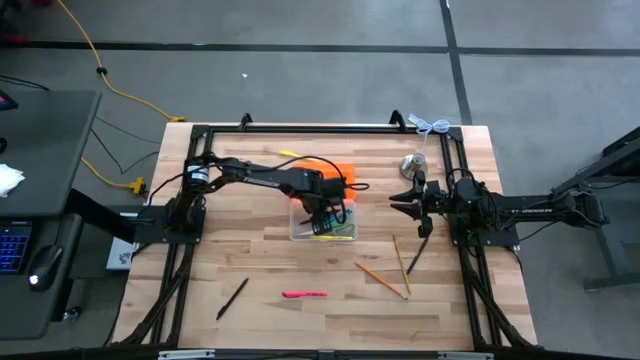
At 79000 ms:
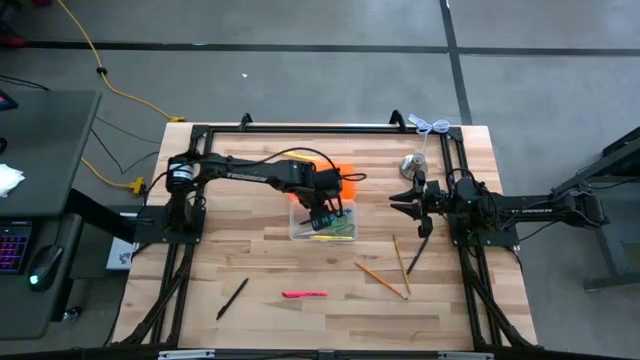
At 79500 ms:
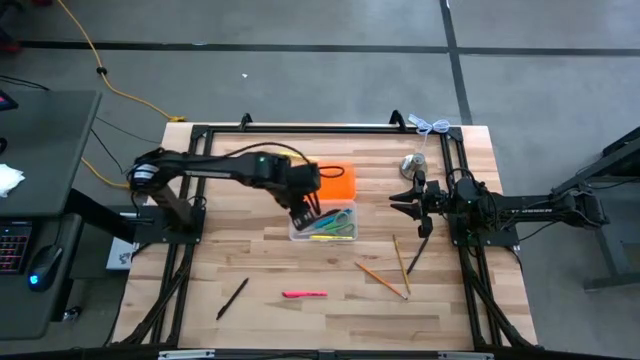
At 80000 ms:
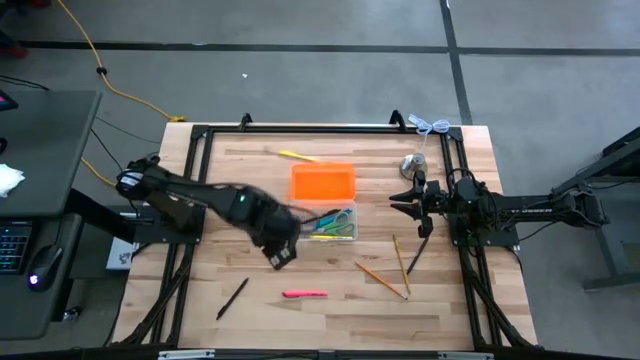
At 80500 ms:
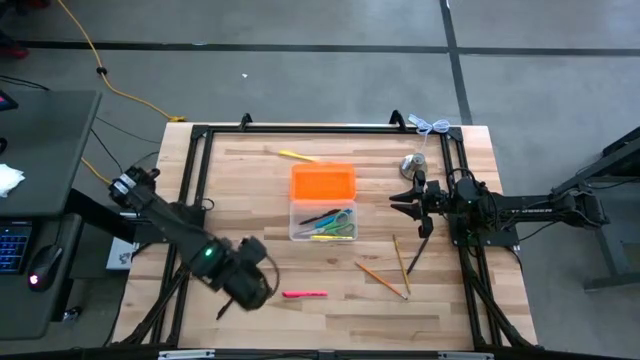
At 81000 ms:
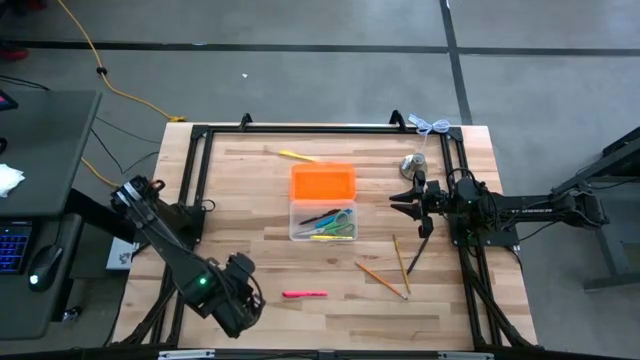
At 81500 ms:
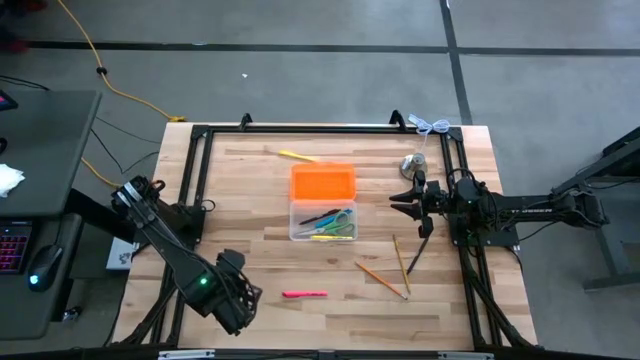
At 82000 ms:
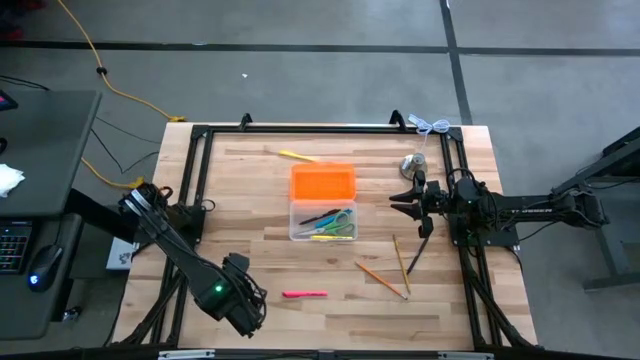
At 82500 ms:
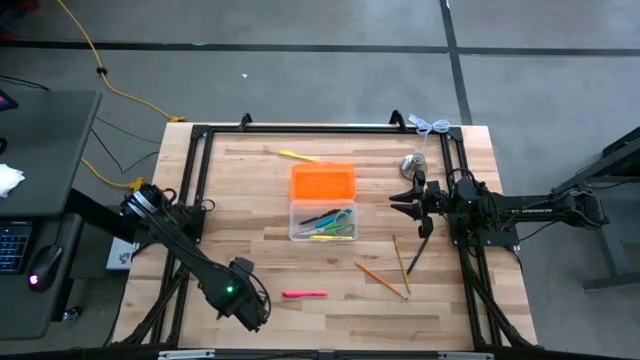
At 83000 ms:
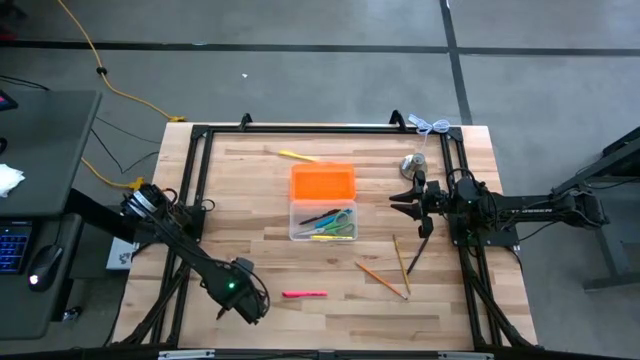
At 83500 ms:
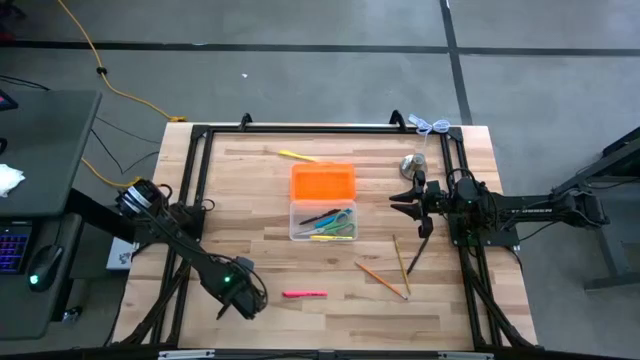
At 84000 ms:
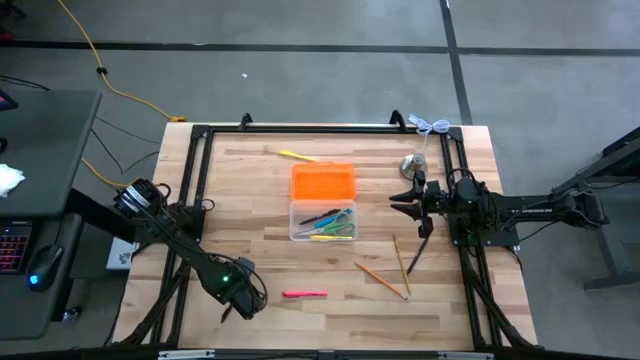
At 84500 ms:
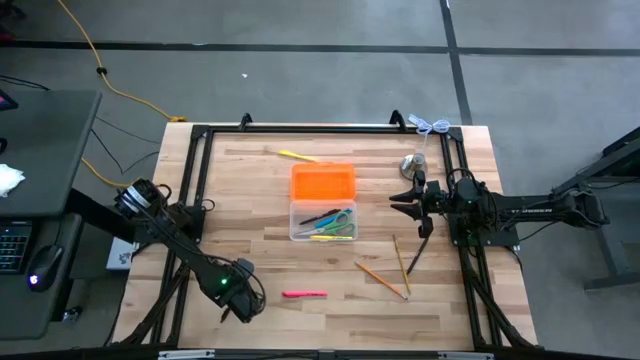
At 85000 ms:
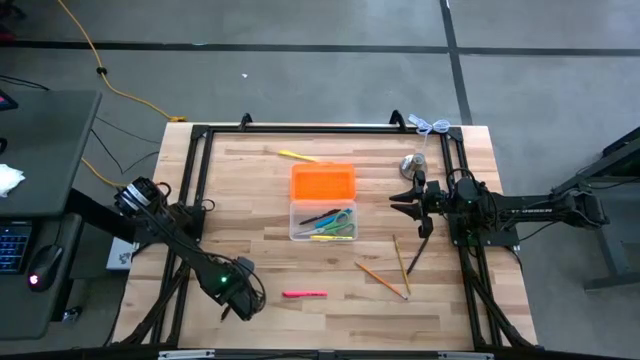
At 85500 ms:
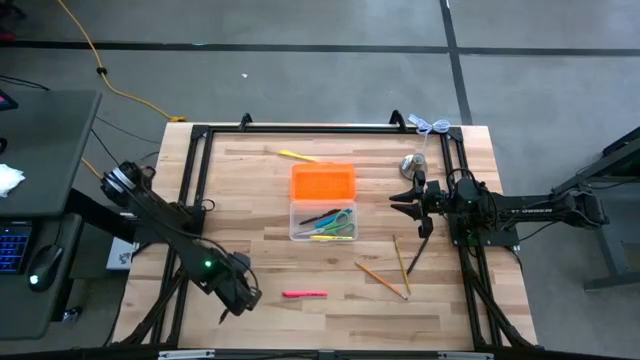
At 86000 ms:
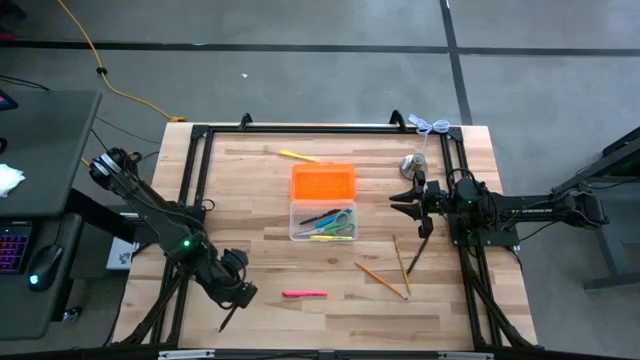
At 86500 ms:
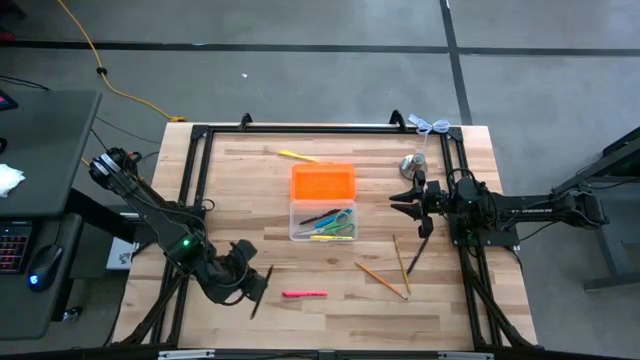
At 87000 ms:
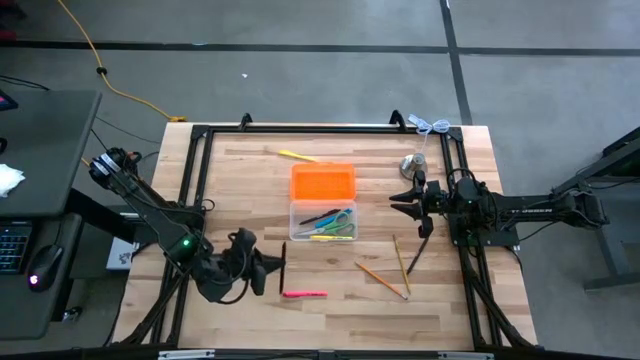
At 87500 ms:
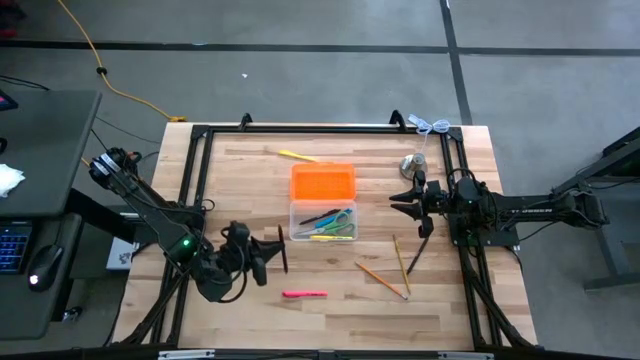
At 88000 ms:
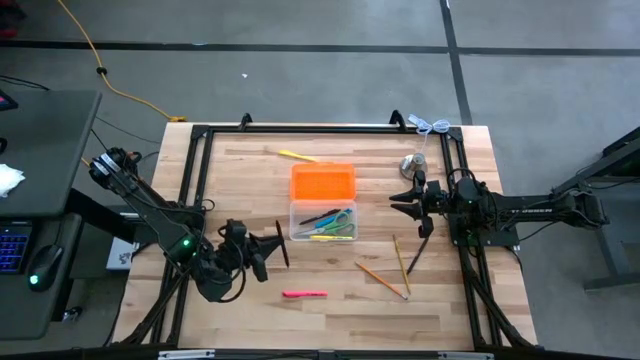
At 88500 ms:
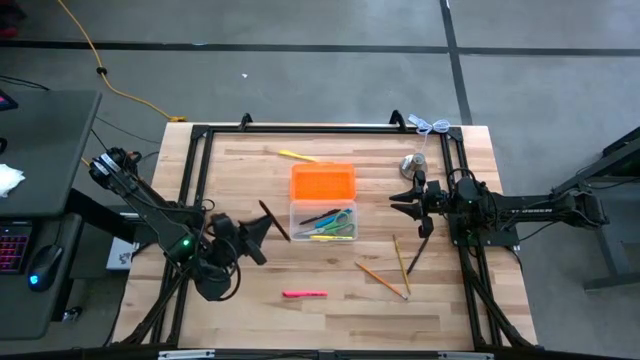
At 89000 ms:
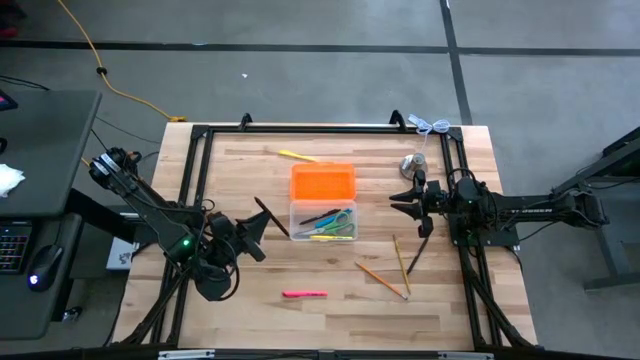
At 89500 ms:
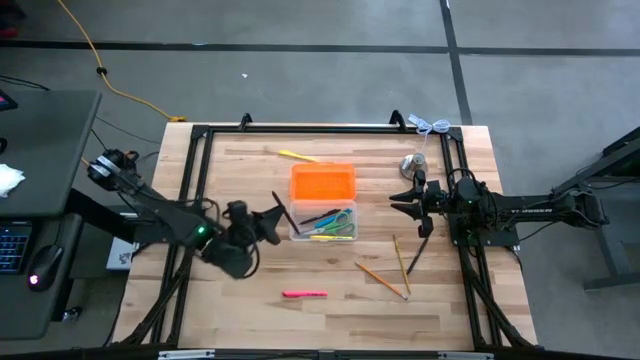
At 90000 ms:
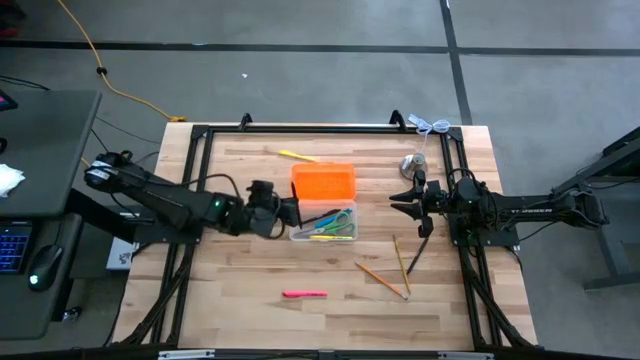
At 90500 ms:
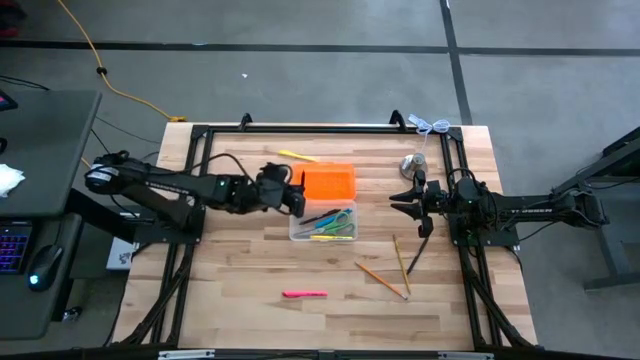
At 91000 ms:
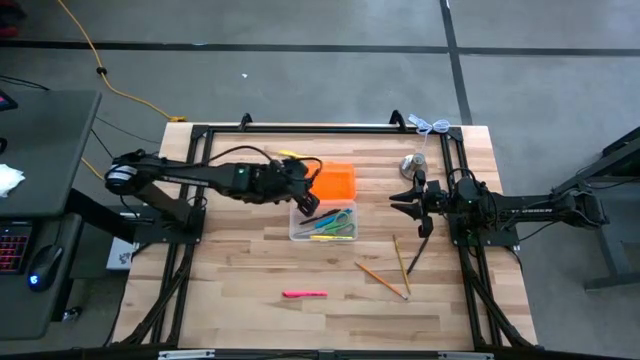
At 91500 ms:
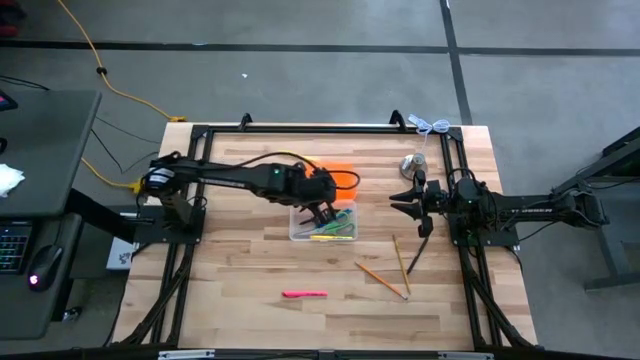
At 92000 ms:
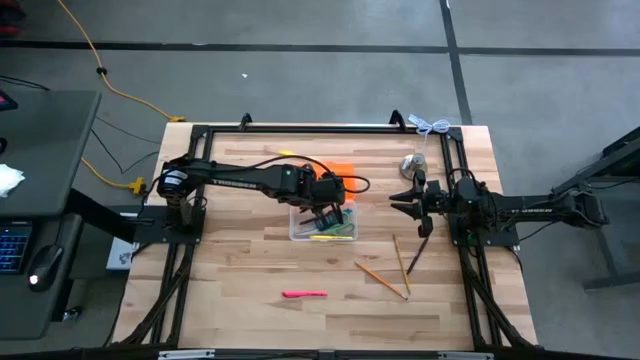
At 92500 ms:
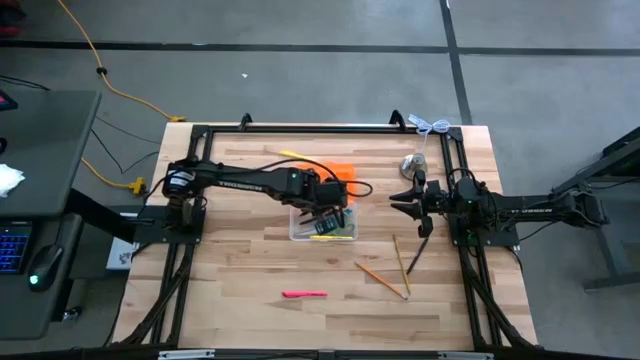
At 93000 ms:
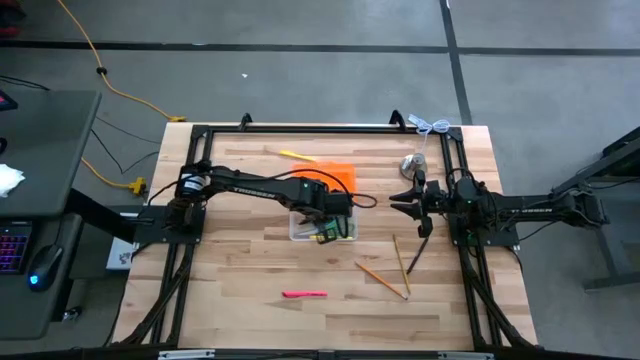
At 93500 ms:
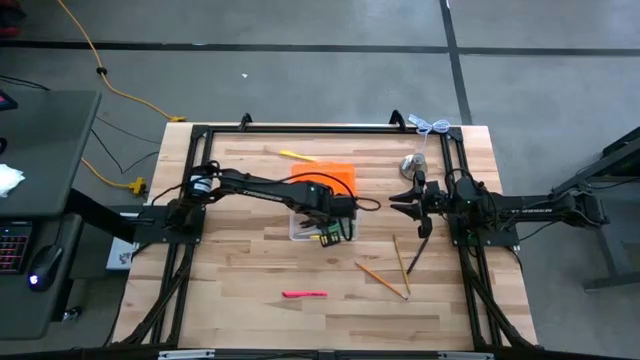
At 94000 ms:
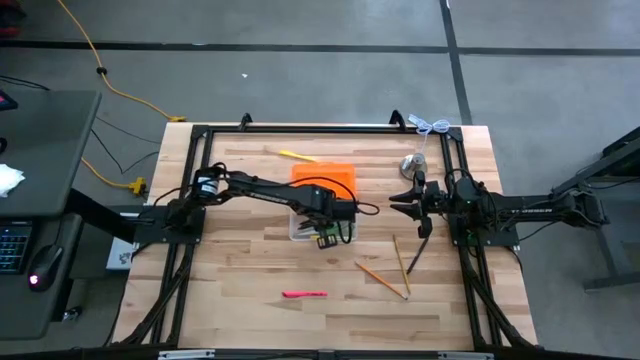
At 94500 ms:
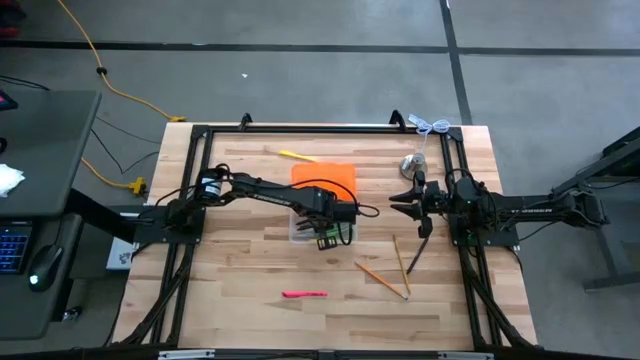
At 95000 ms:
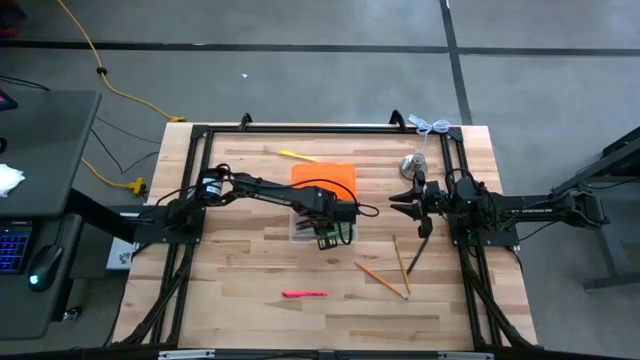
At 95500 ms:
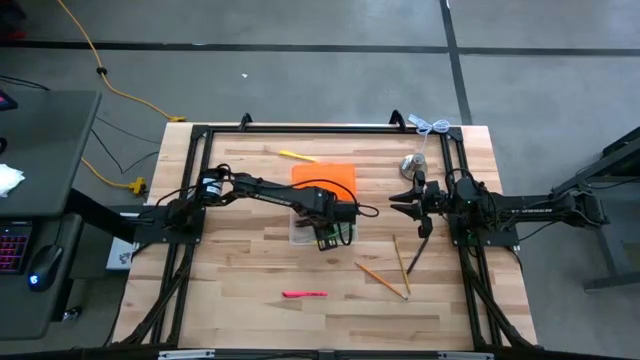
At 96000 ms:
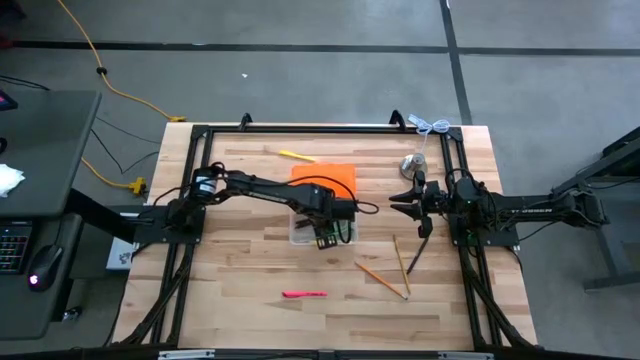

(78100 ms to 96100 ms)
Task: Pick & place school supplies into a supply box
Put the bottom black pen into the orange supply box

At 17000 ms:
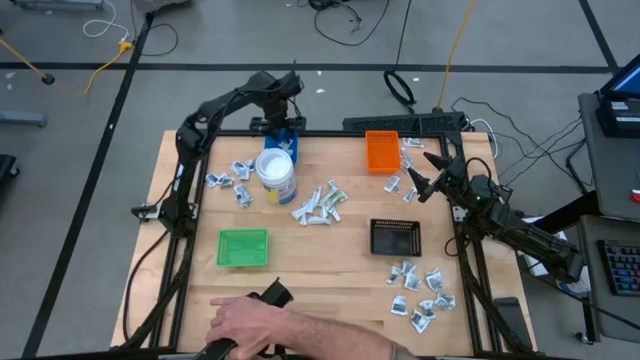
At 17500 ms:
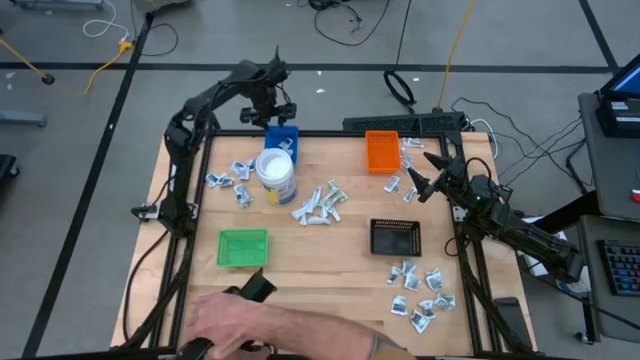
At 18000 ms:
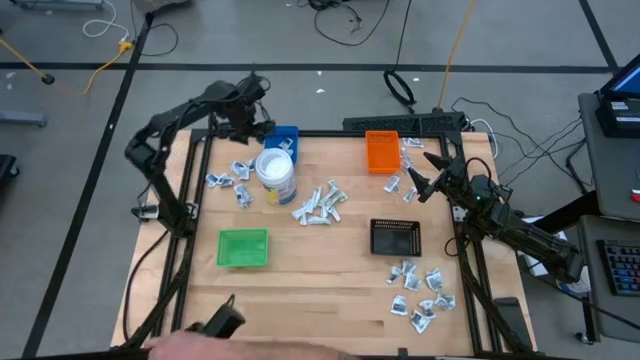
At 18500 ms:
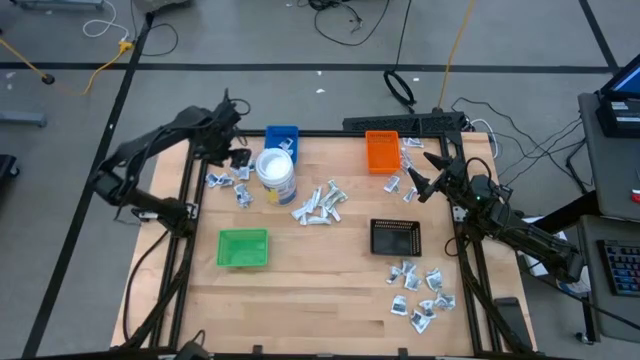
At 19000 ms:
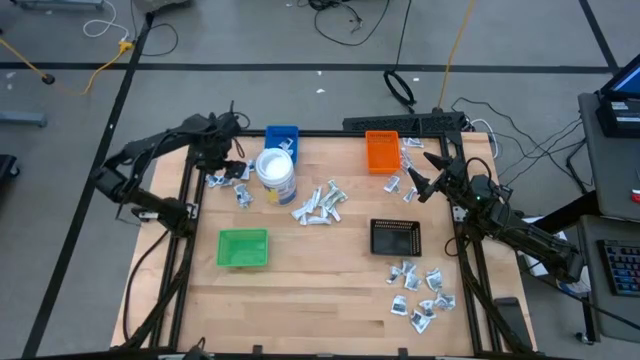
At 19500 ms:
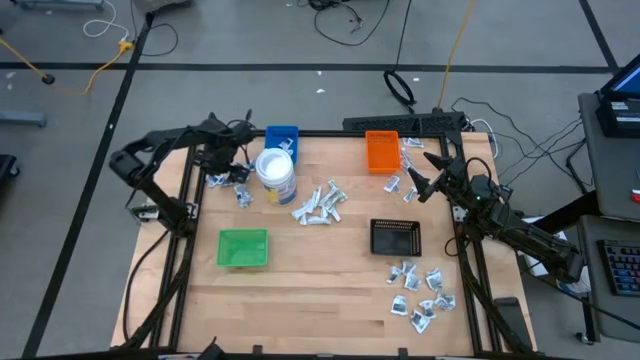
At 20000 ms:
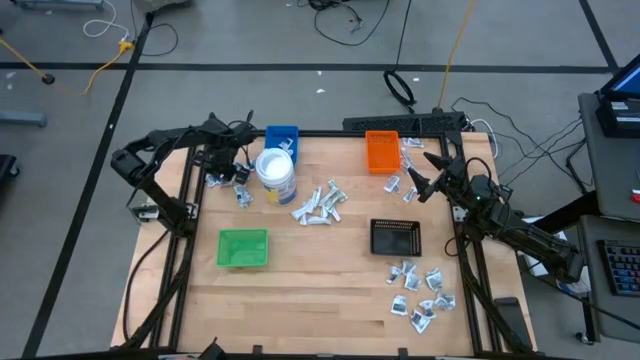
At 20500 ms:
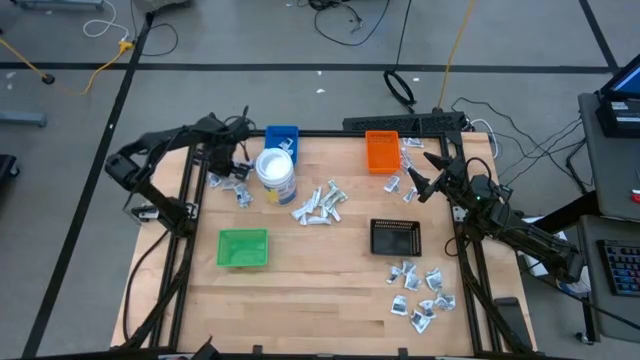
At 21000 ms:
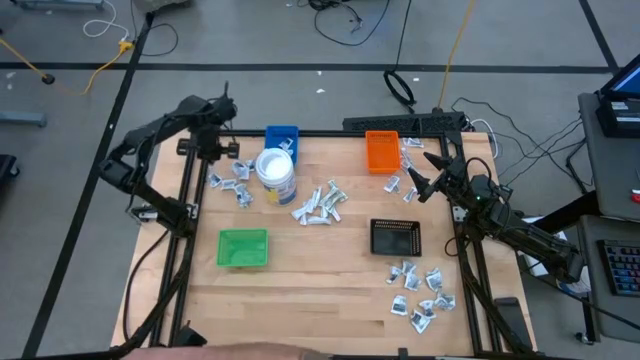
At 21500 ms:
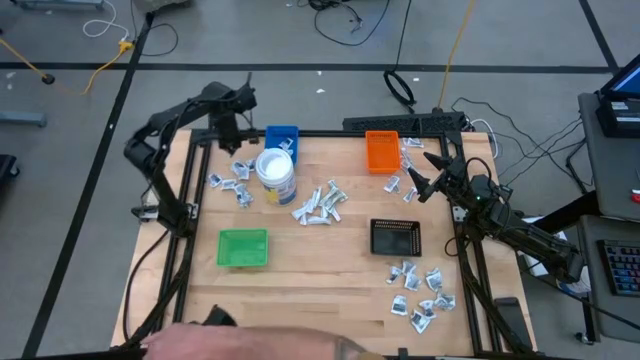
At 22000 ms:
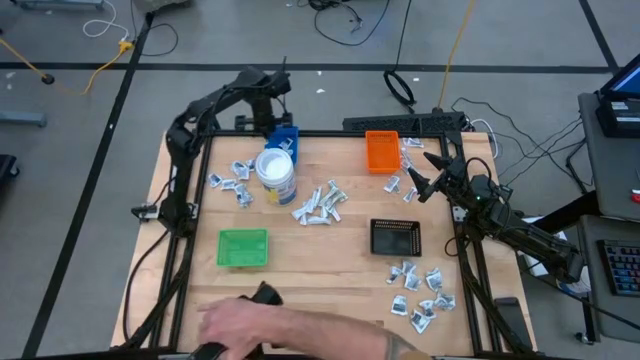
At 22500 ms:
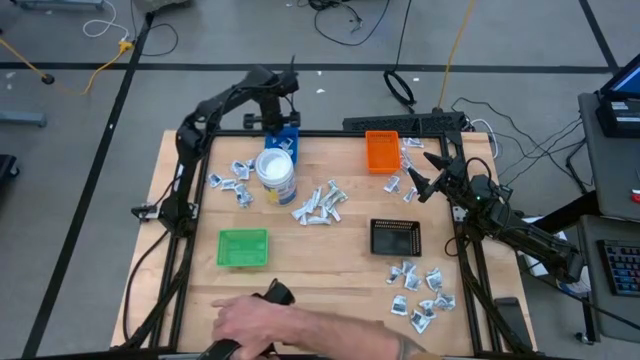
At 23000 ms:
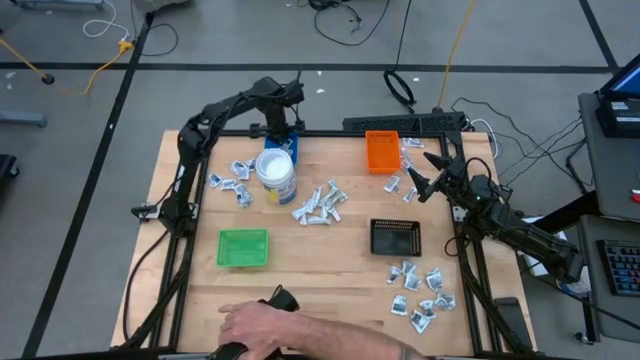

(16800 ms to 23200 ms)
Task: Pick & Place First Aid Supplies
Put the blue alcohol pad into the blue bin
